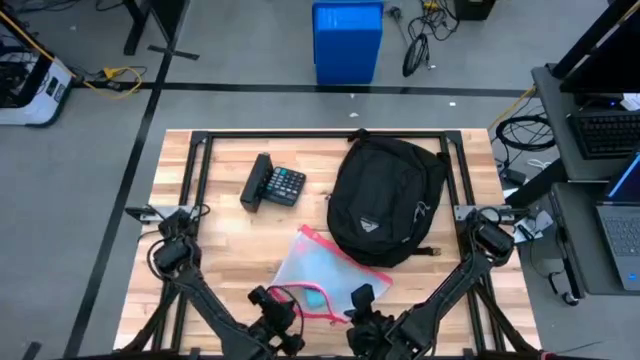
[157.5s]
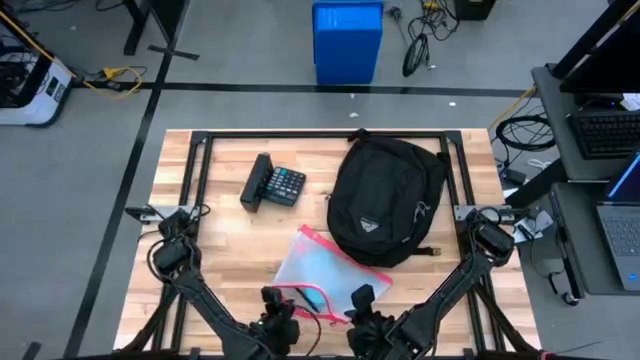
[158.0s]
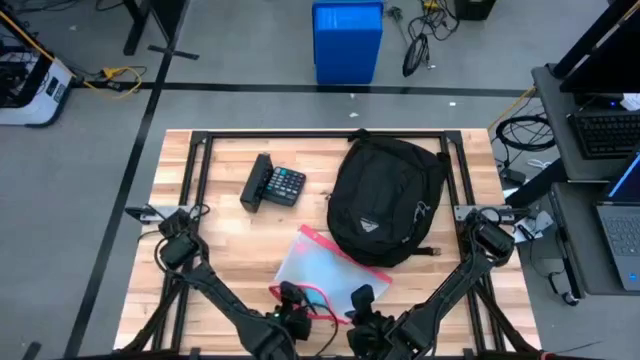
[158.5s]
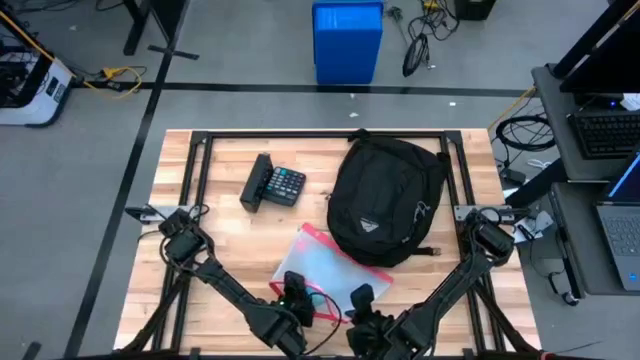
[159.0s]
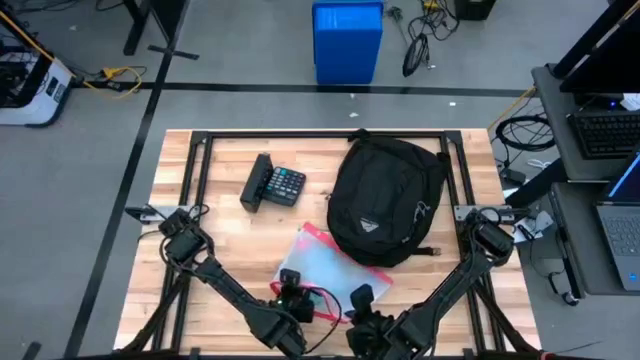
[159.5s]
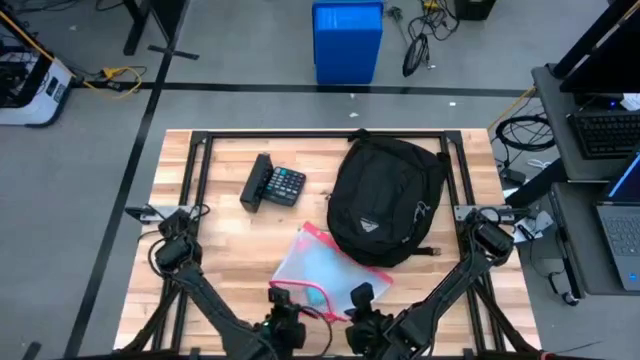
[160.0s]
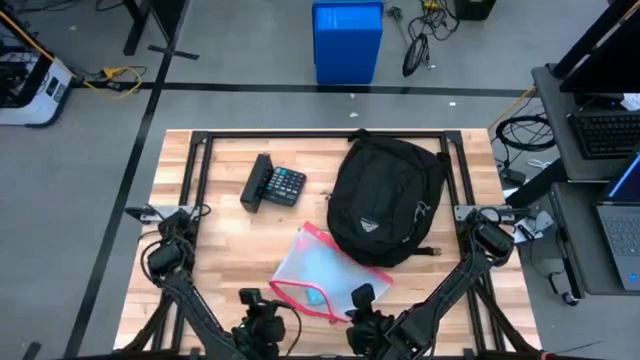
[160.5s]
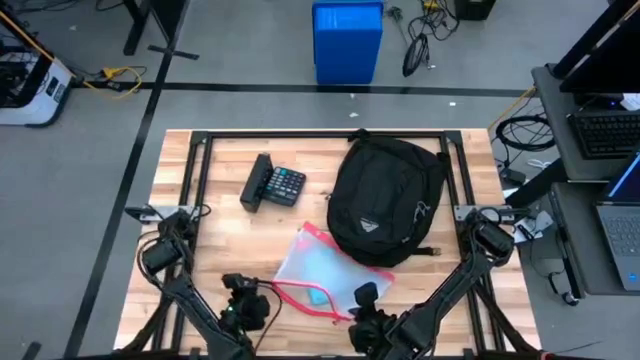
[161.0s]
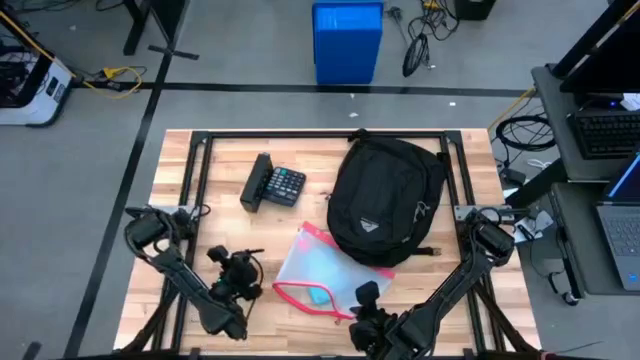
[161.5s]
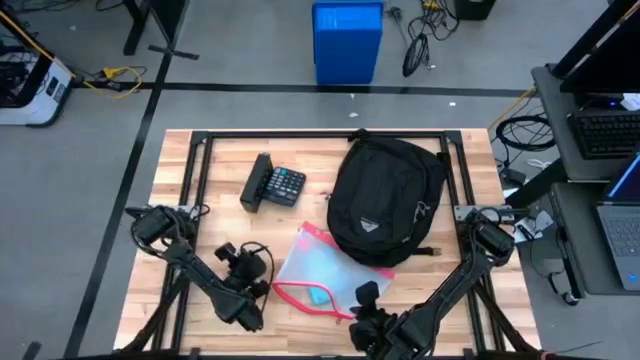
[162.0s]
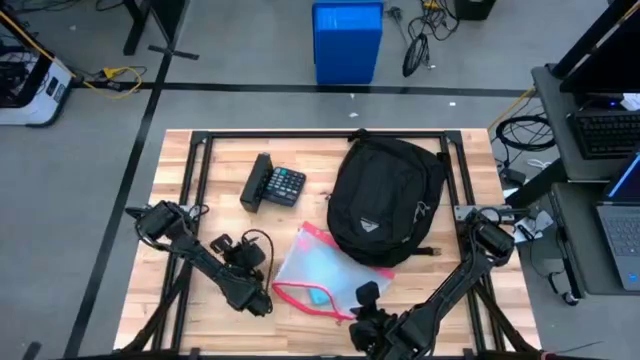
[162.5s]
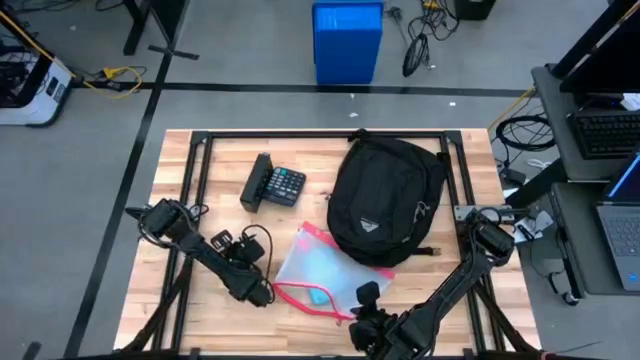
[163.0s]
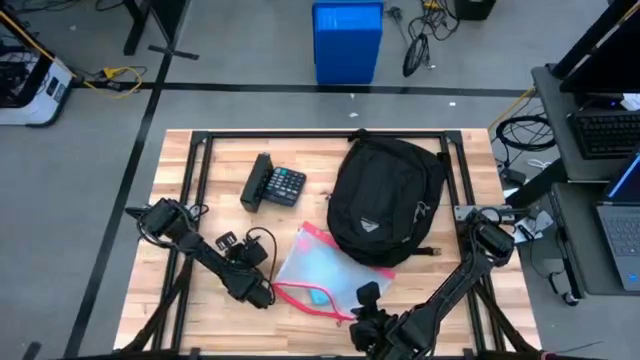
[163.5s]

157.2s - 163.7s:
Task: Unpack backpack
Remove the black pen from the white zip bag

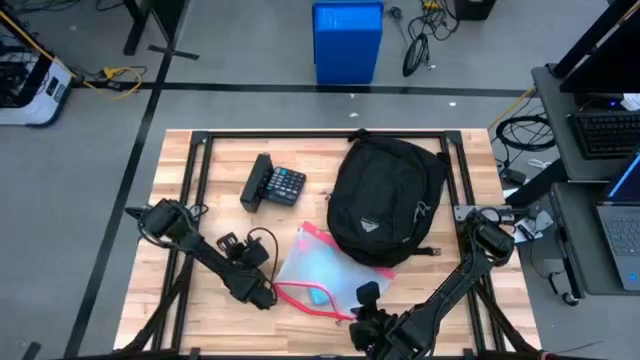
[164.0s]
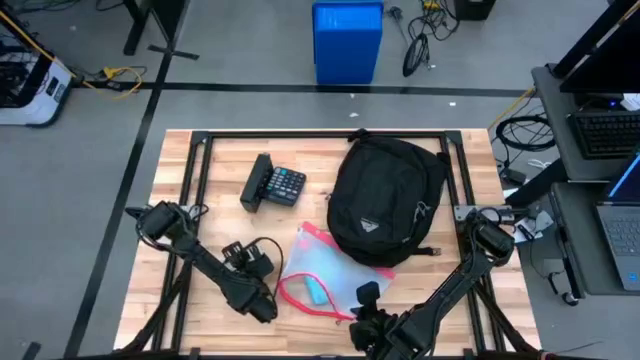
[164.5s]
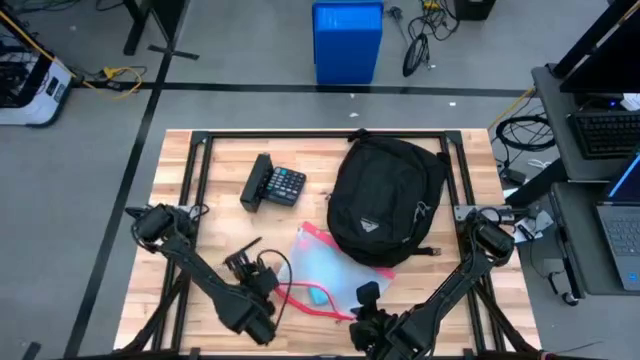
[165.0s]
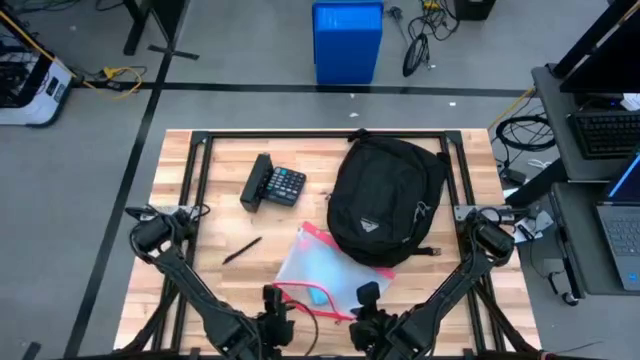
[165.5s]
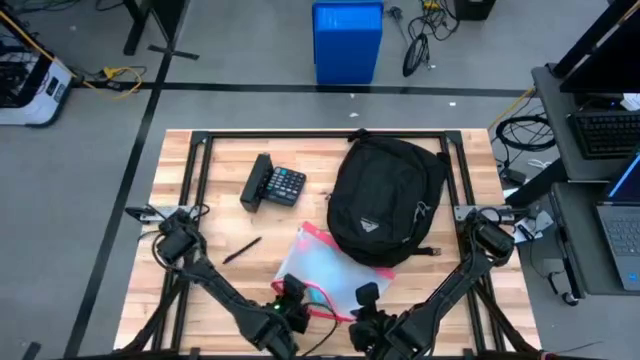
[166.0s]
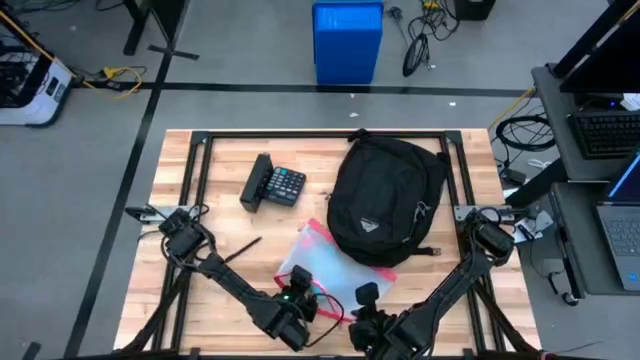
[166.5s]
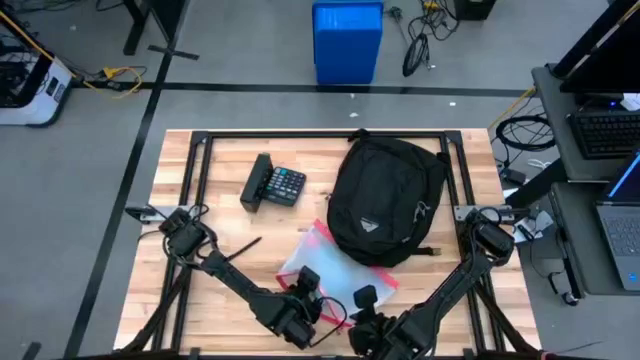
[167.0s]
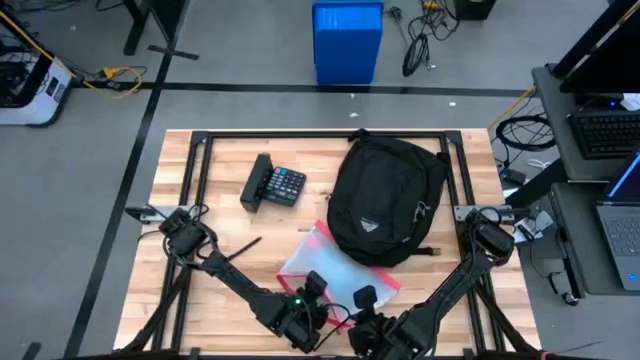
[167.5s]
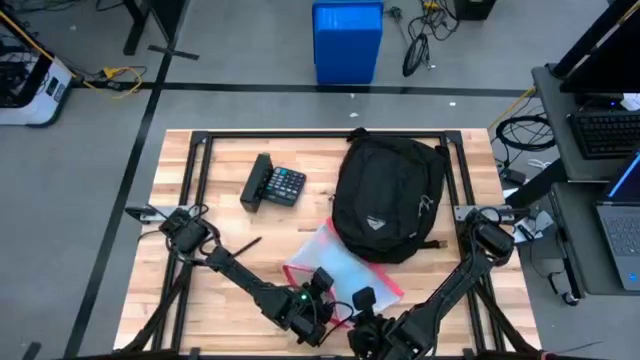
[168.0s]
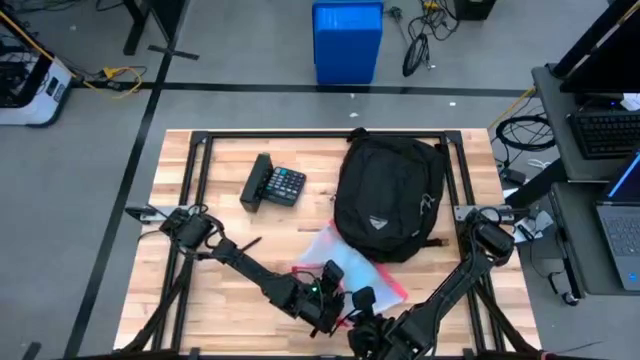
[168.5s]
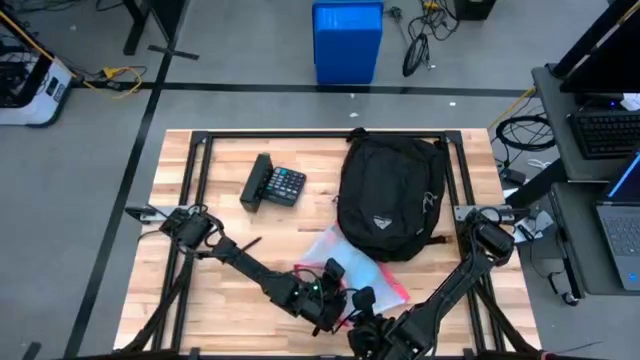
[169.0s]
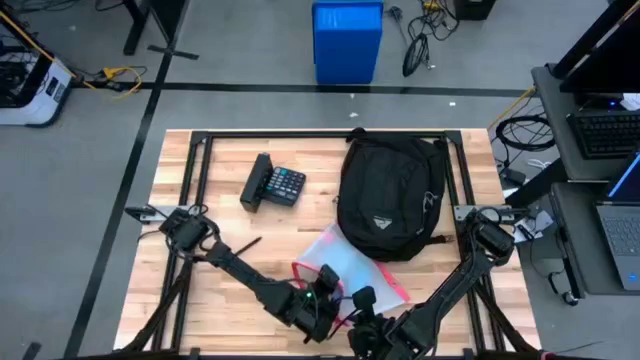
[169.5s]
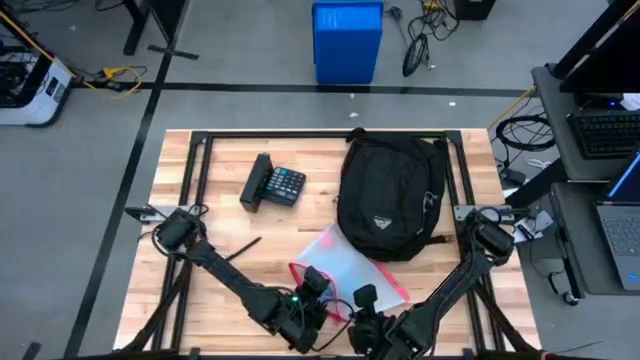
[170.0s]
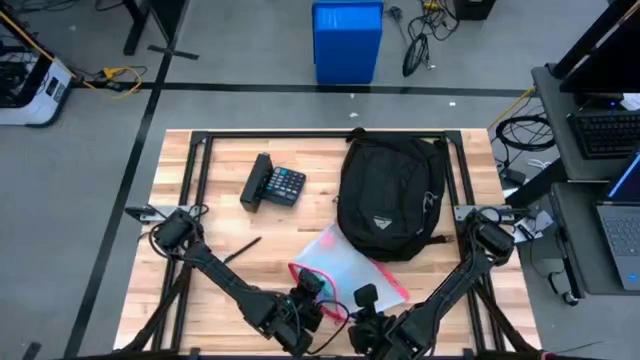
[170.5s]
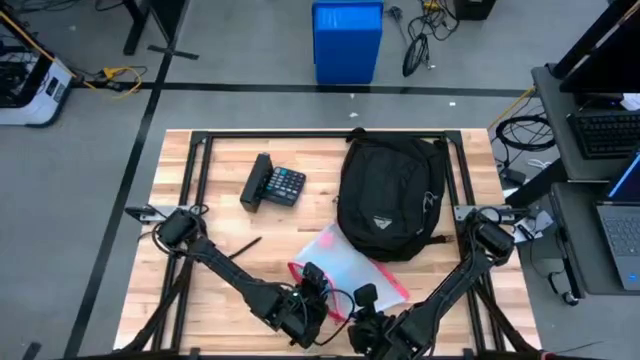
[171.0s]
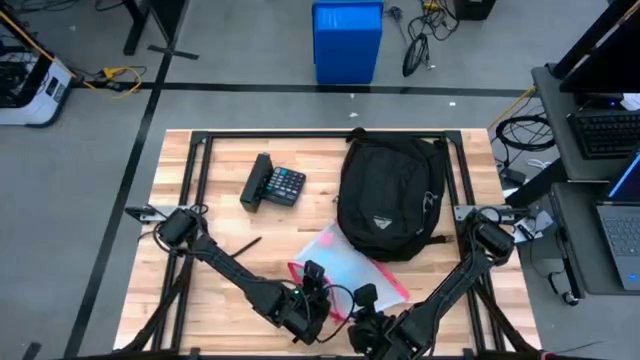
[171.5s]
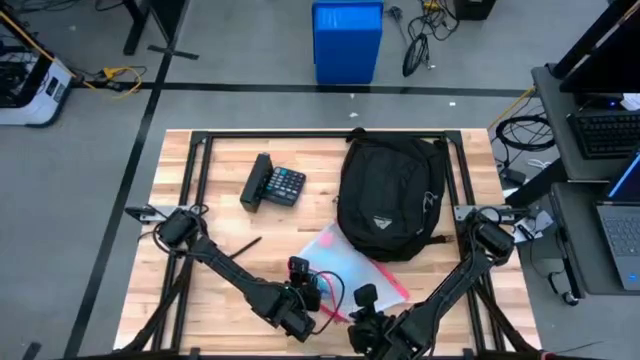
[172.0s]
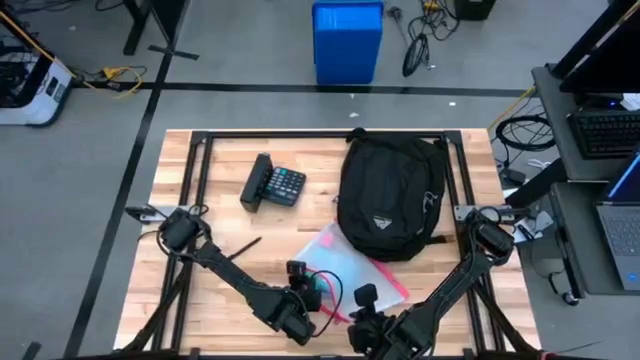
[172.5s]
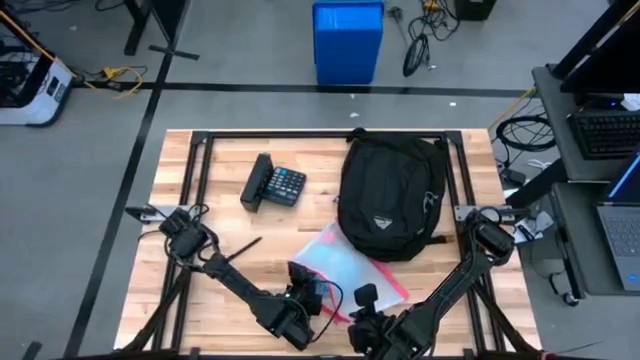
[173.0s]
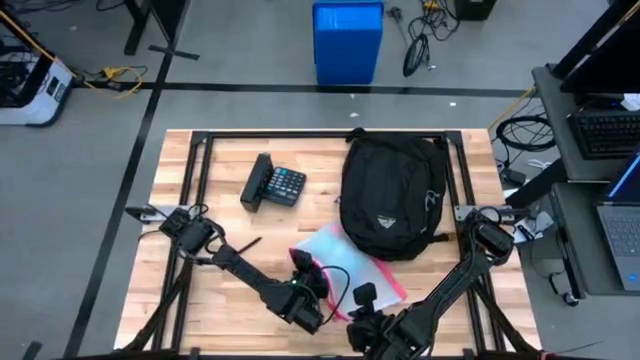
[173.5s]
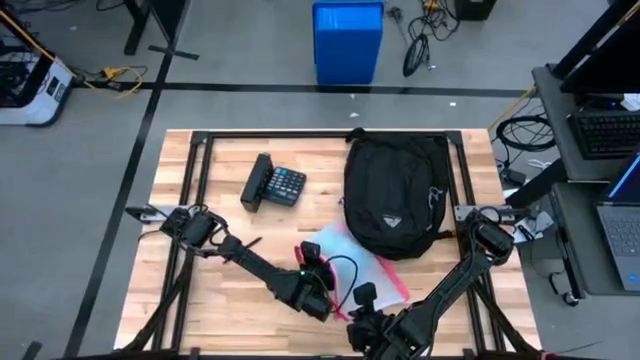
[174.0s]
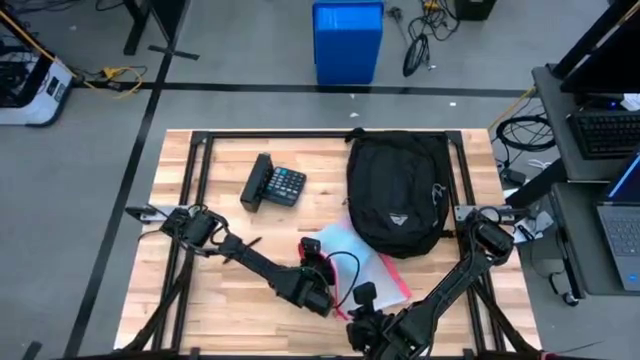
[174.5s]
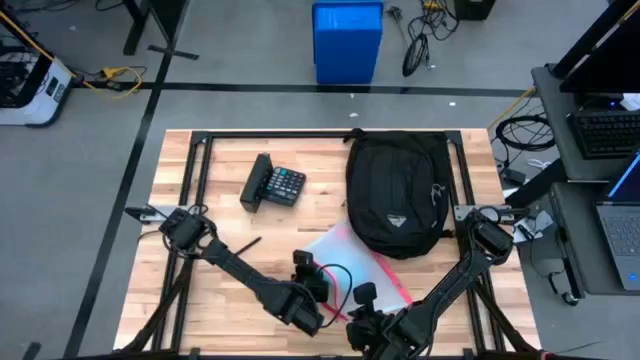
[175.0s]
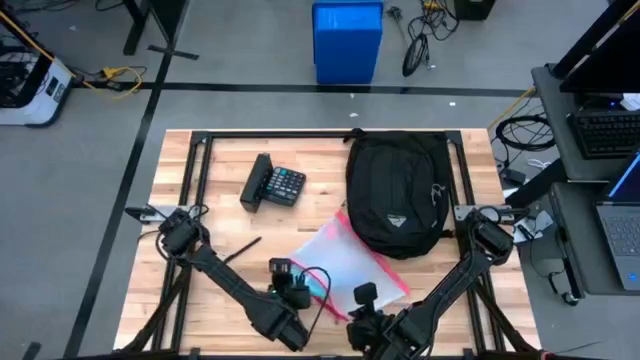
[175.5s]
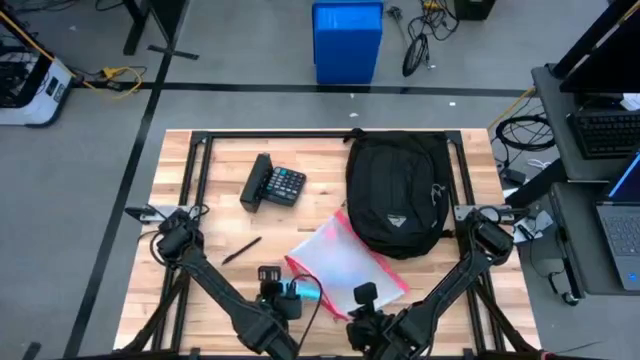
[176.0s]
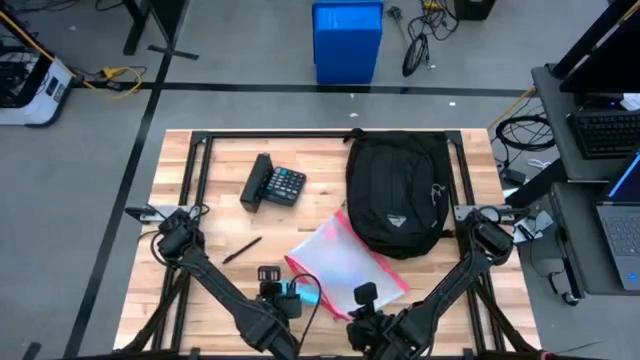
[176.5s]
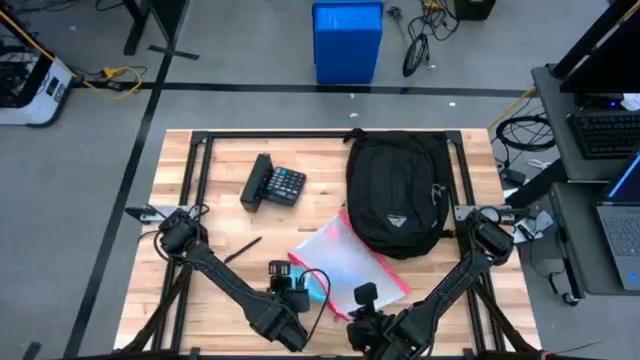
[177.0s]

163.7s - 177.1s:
Remove the blue calculator from the white zip bag

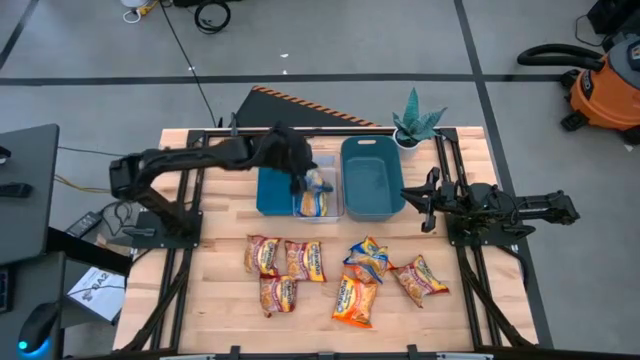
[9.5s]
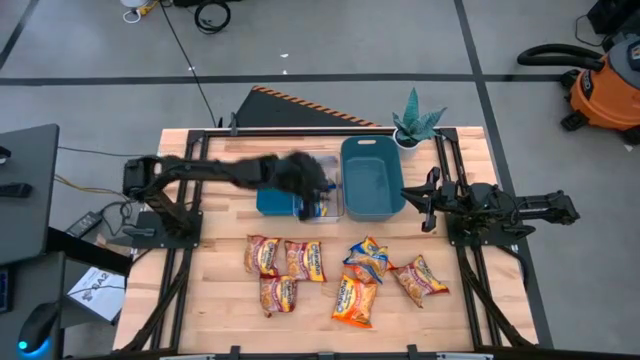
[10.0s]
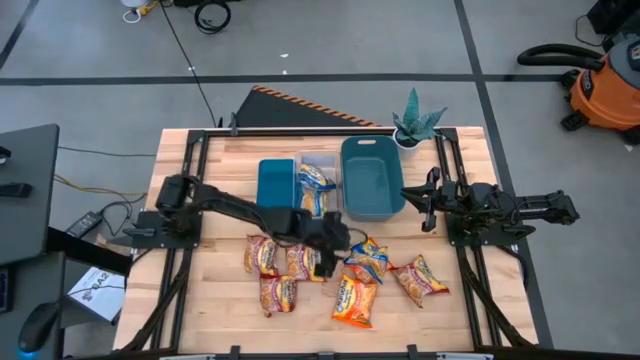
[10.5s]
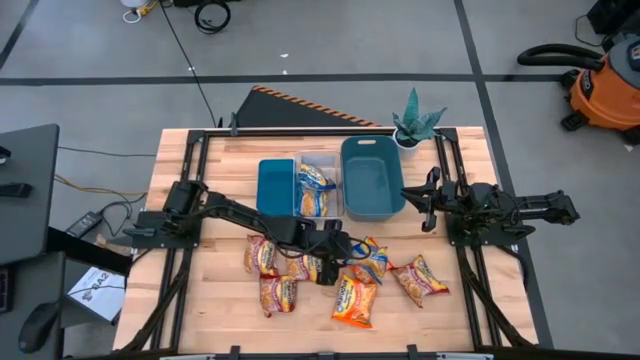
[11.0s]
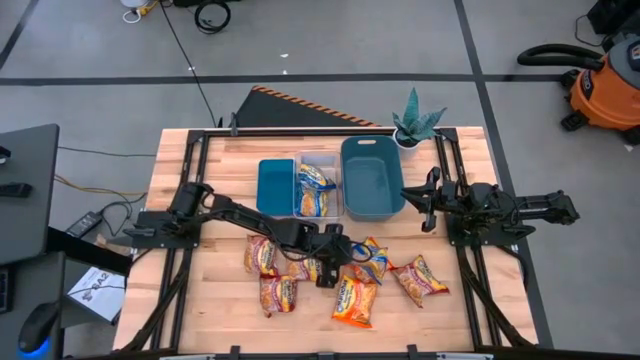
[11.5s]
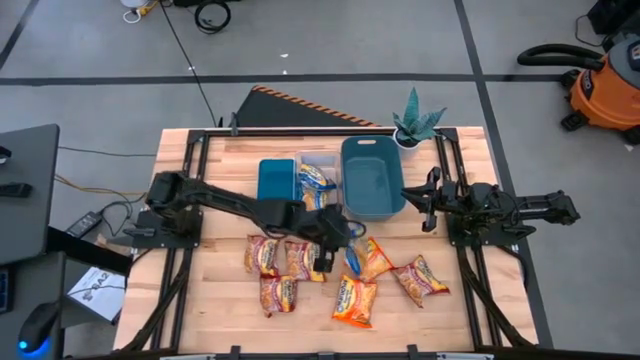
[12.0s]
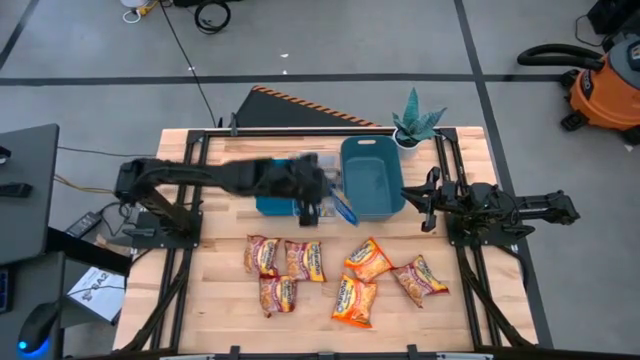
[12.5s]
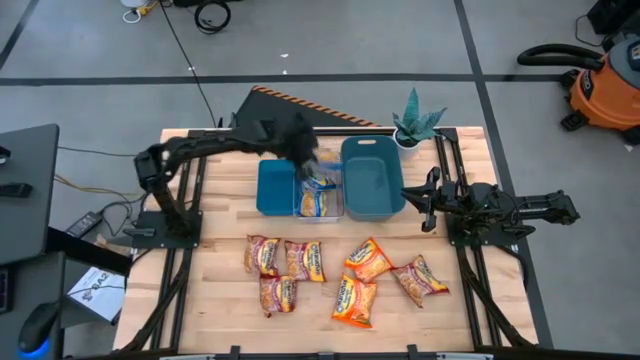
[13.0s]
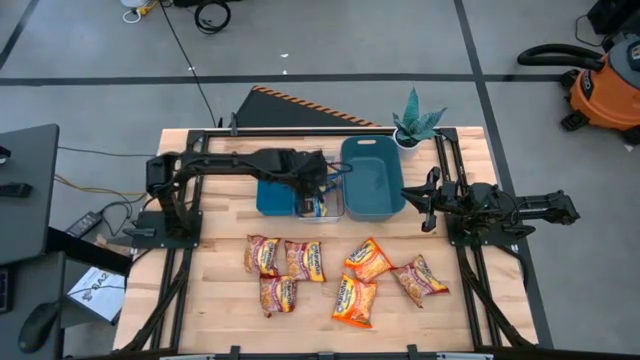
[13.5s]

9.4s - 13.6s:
Task: Sort Maruchan noodles
Put the blue noodle into the transparent bin
